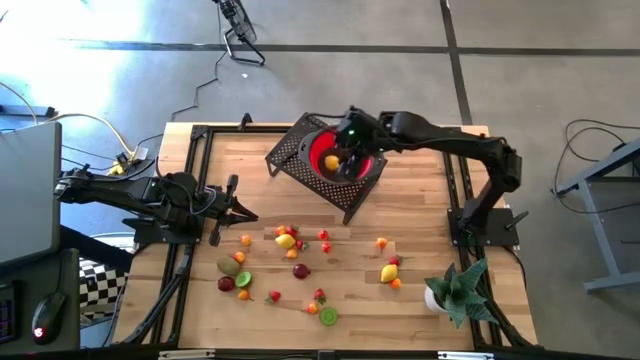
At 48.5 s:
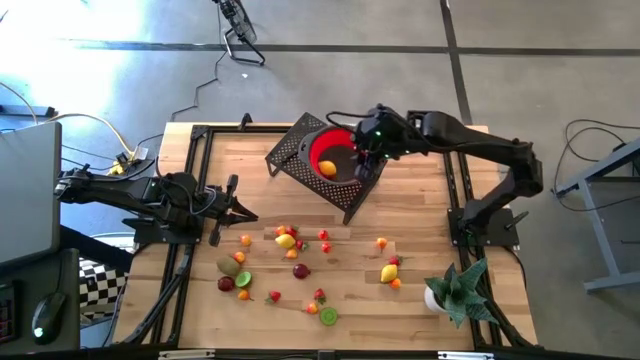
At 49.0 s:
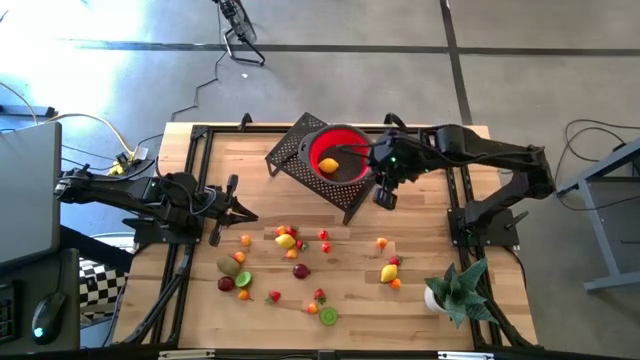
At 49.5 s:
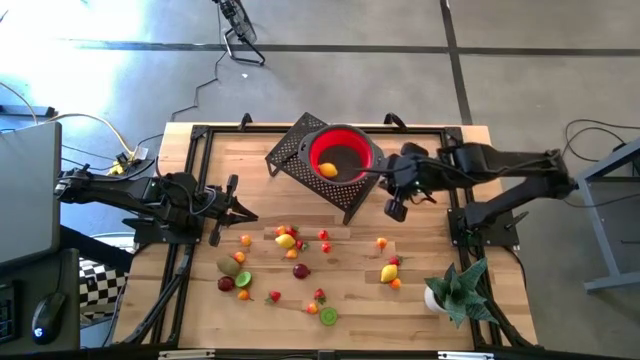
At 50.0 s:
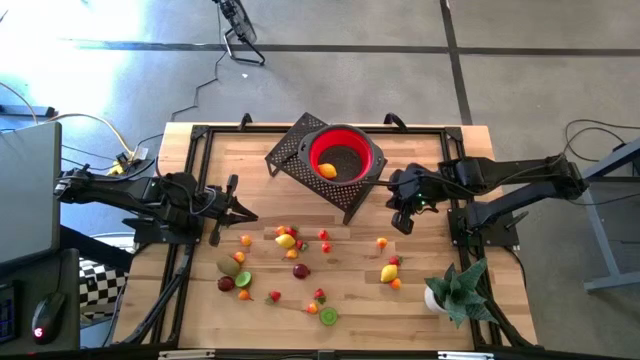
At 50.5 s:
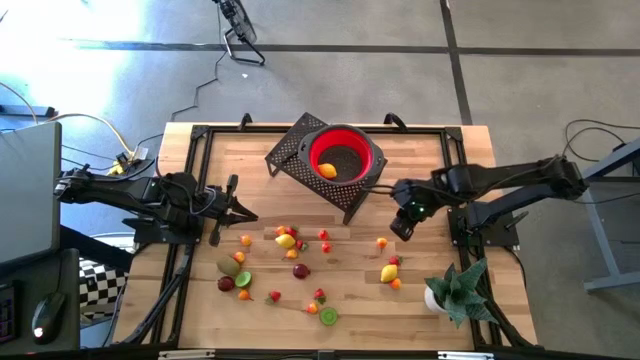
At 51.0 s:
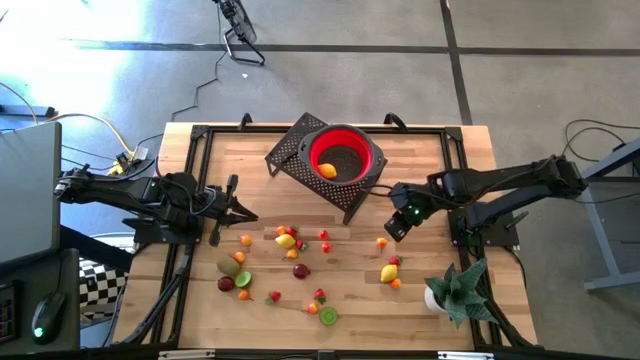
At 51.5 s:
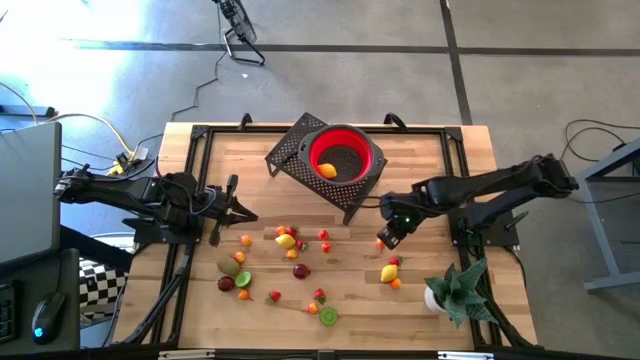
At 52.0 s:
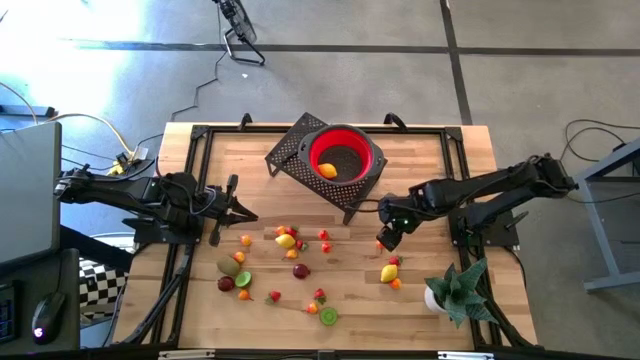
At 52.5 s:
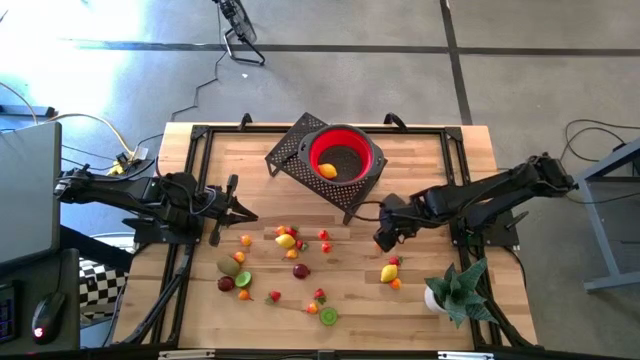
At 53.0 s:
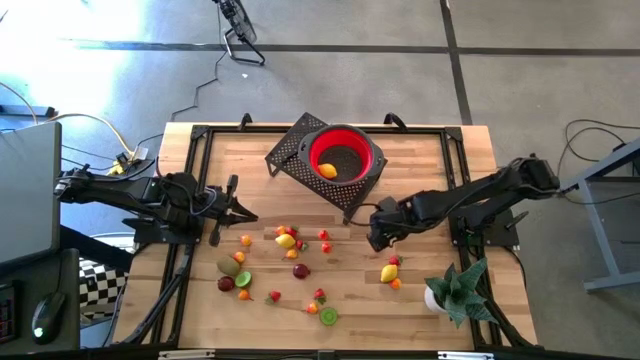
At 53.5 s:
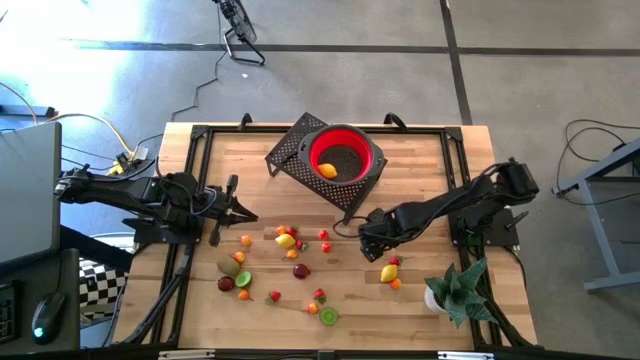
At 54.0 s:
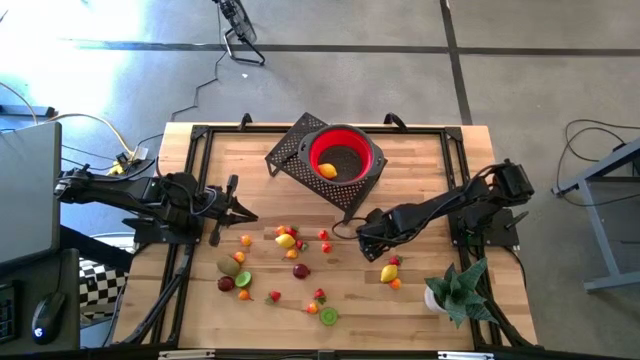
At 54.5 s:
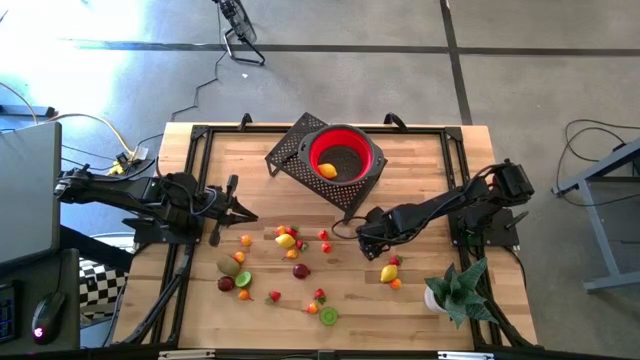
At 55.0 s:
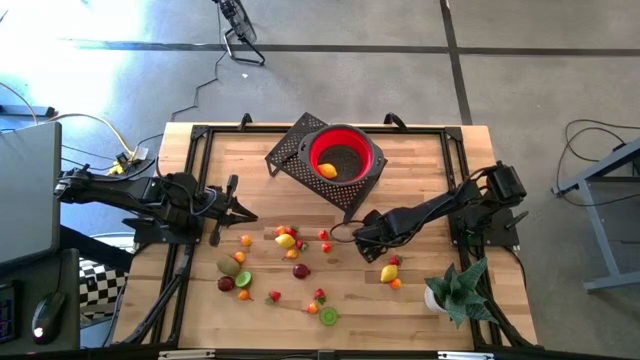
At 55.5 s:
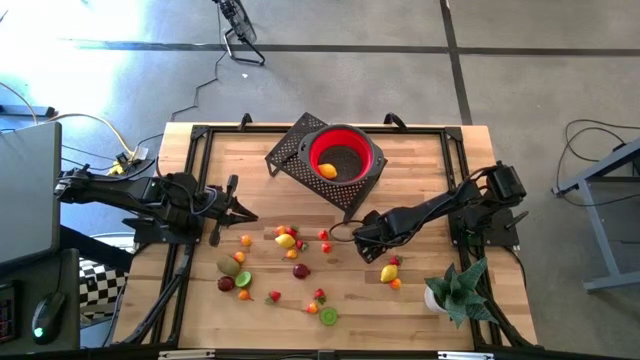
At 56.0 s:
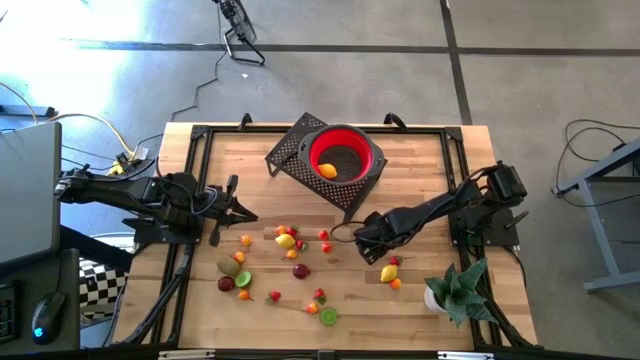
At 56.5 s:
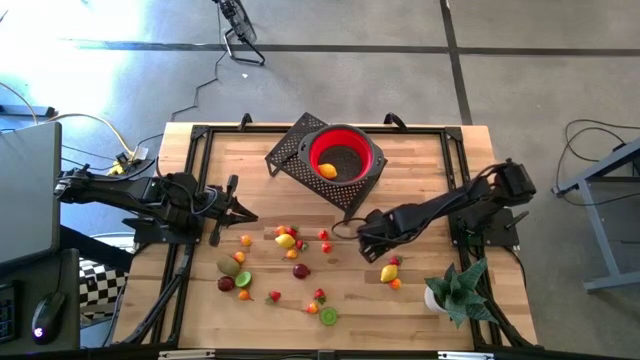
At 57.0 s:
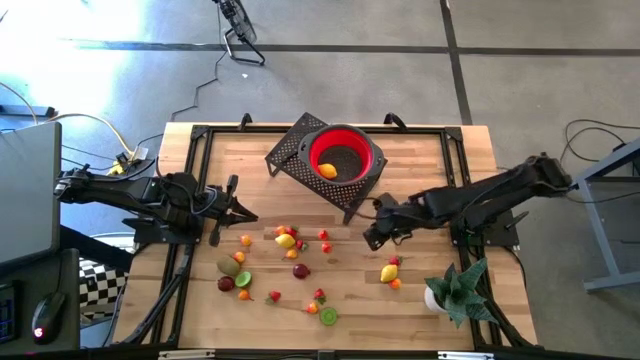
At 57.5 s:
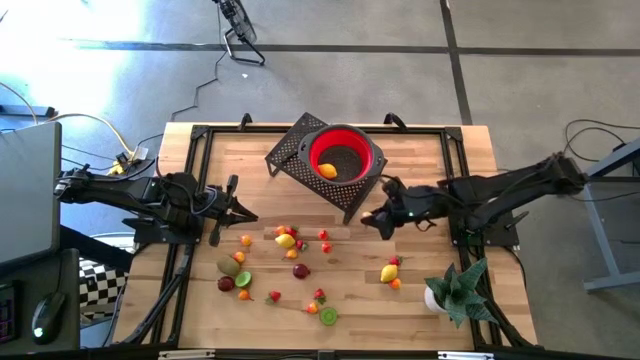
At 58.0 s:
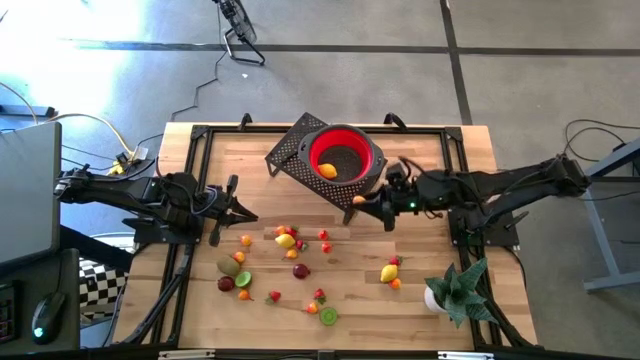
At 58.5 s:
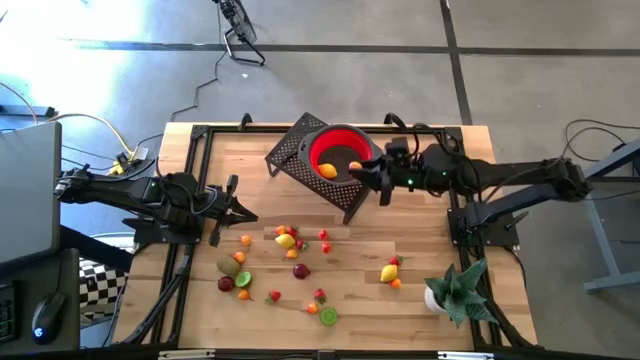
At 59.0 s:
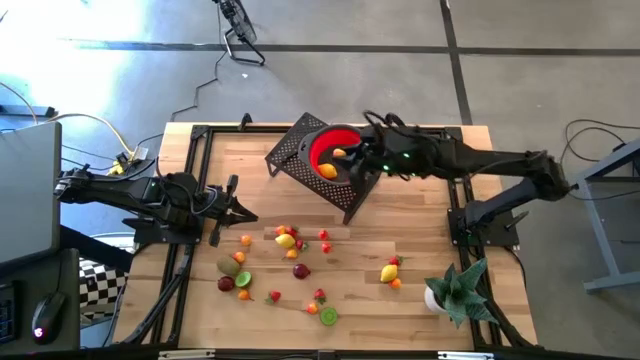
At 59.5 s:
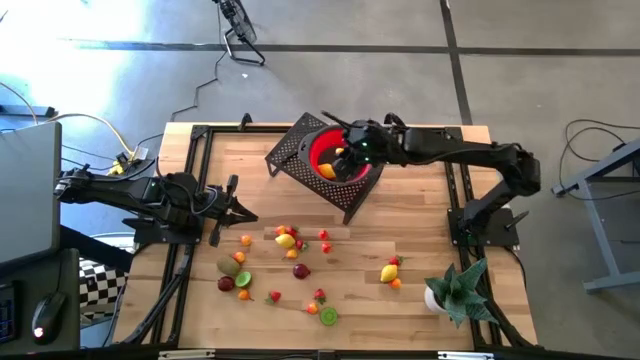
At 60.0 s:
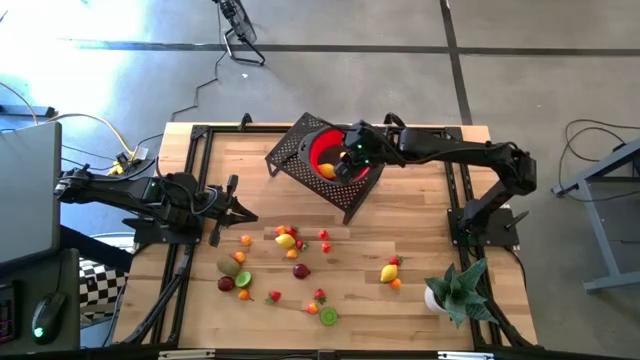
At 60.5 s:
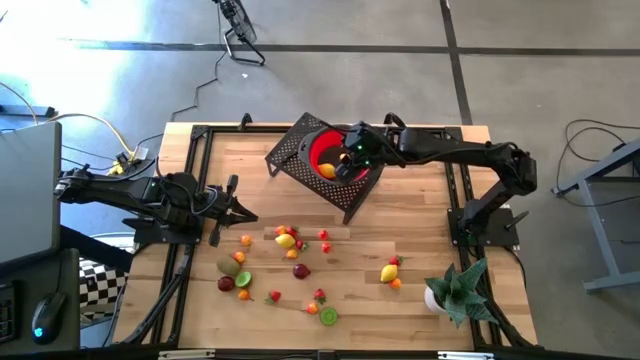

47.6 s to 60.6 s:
Task: Pick & Place Fruit
Put the pear into the strainer bowl on the shelf

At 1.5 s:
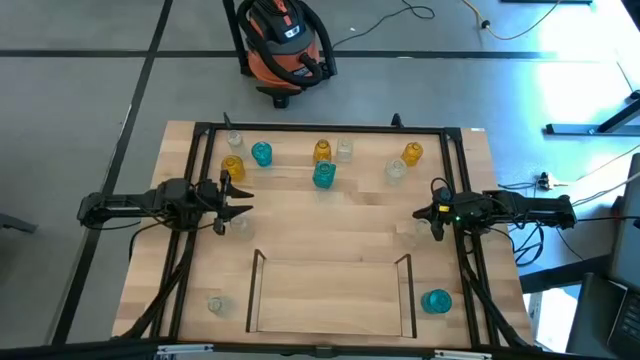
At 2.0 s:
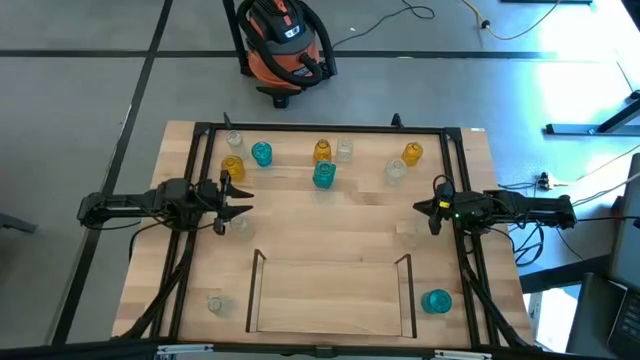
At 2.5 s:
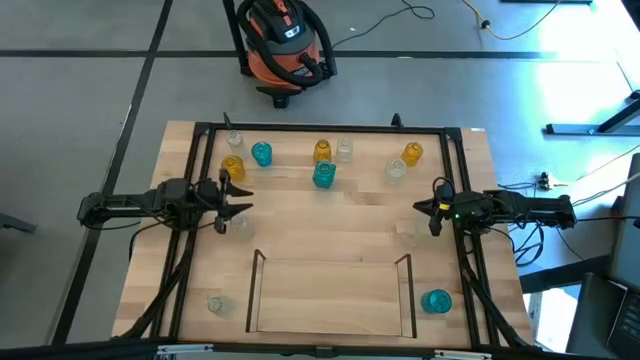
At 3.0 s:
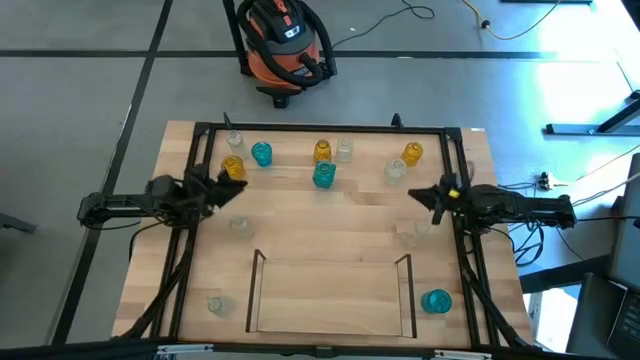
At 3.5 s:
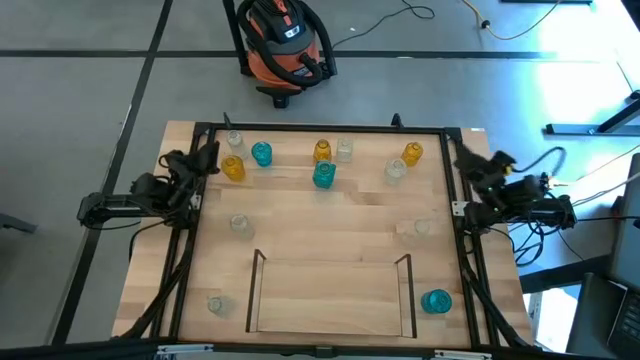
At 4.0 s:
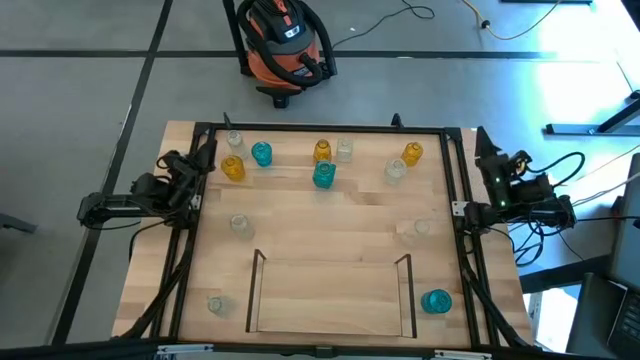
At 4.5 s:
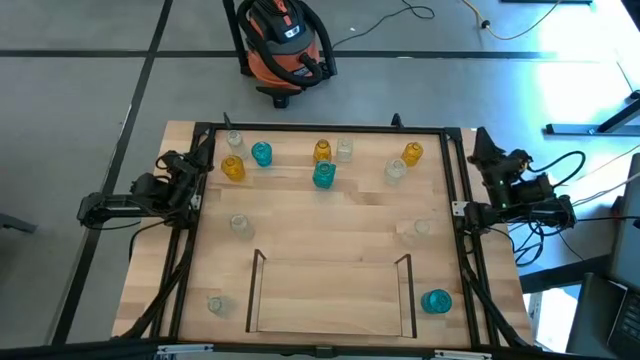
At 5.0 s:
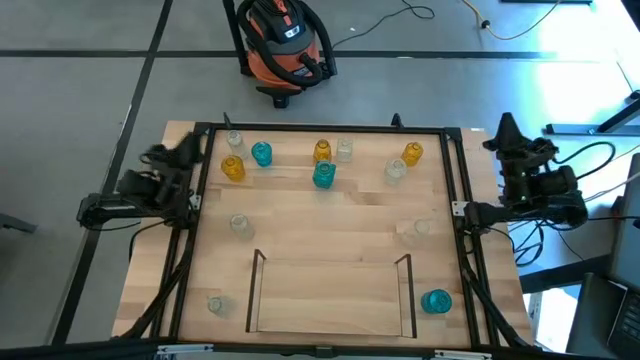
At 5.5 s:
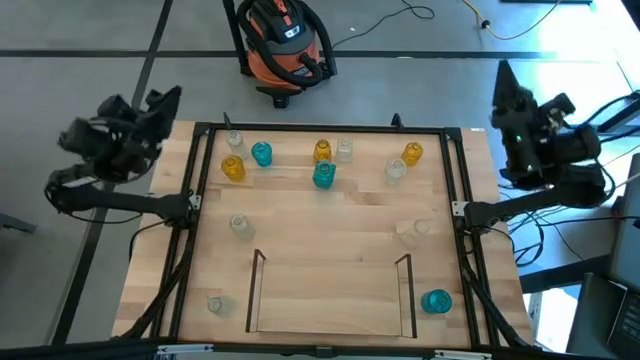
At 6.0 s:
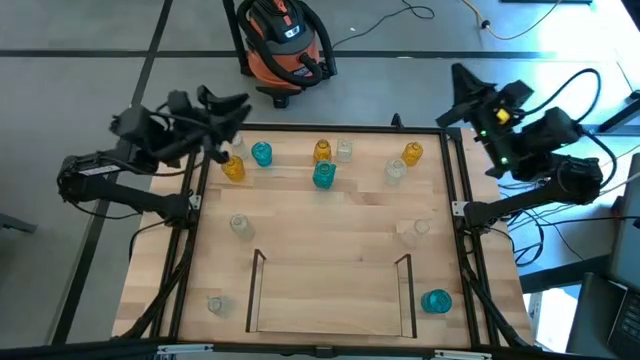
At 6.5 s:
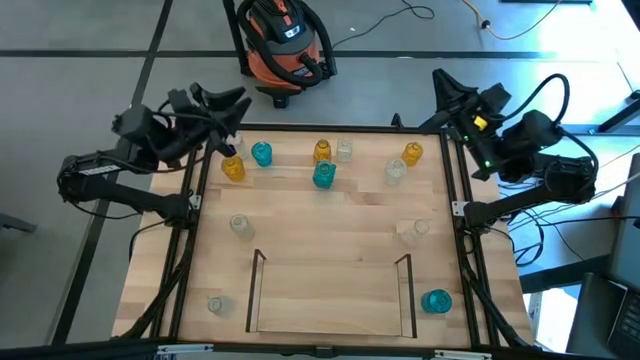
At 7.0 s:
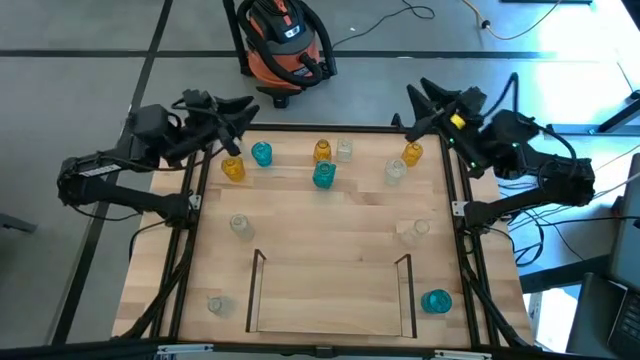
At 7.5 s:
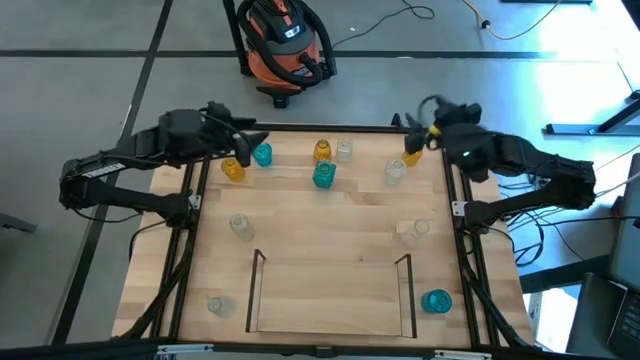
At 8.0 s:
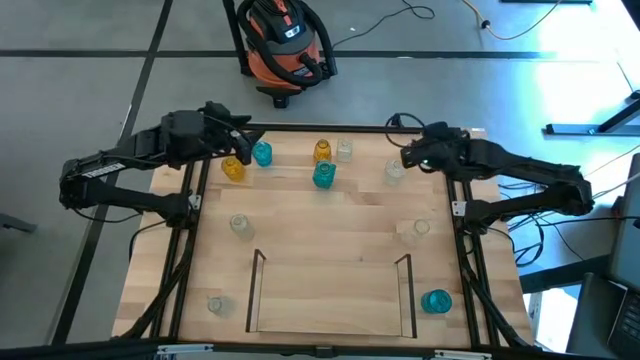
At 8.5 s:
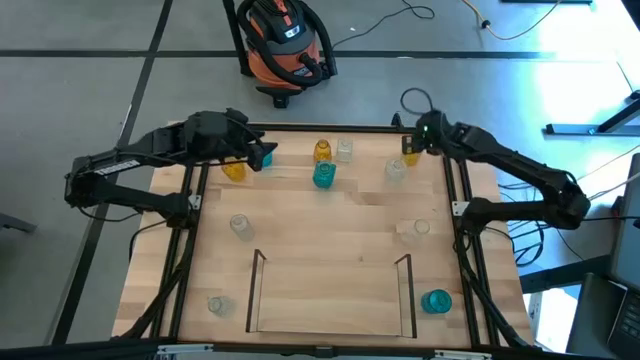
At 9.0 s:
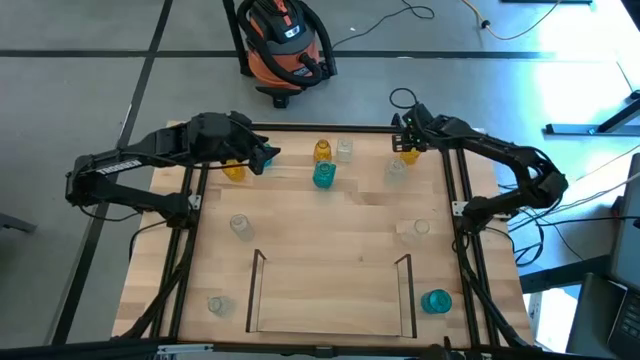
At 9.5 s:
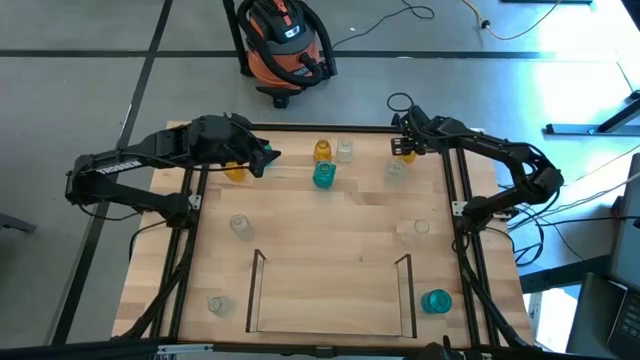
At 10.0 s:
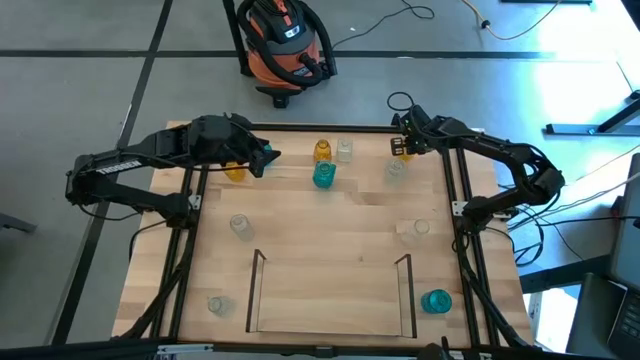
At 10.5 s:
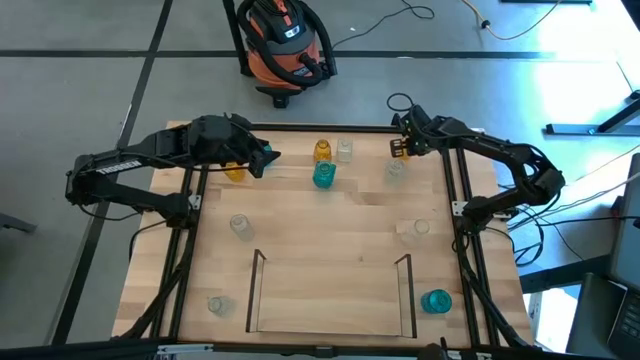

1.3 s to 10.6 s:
Task: sort vases onto shelf
Put the yellow vase on the shelf
